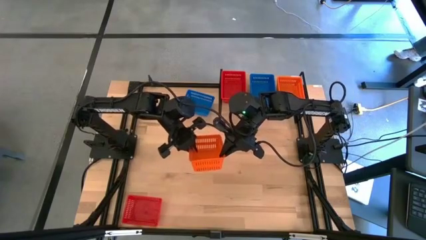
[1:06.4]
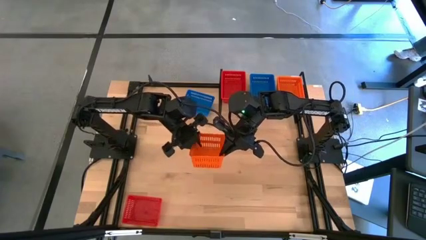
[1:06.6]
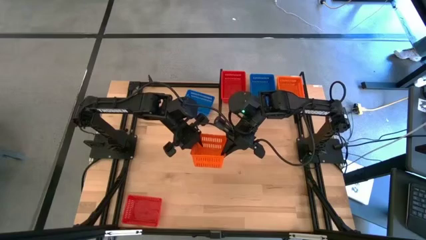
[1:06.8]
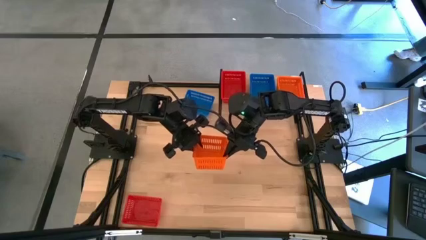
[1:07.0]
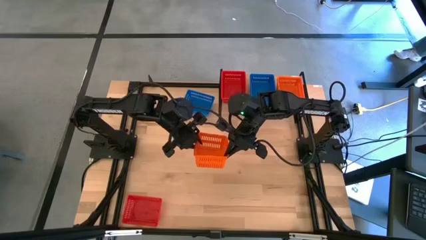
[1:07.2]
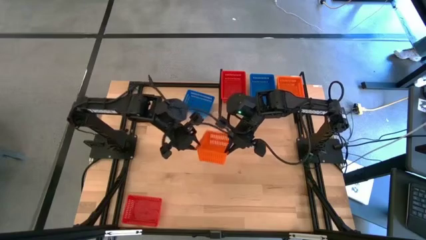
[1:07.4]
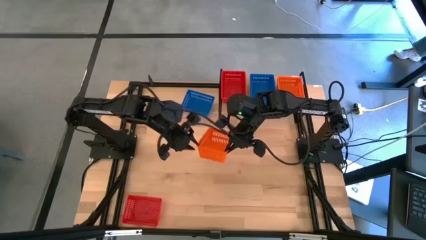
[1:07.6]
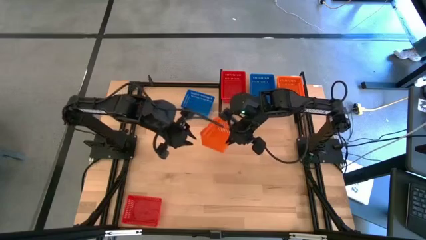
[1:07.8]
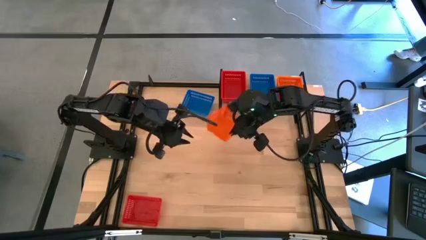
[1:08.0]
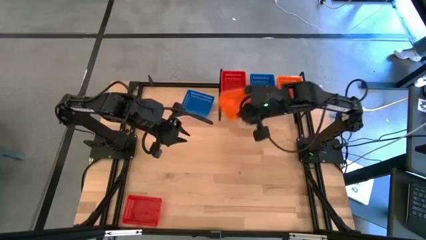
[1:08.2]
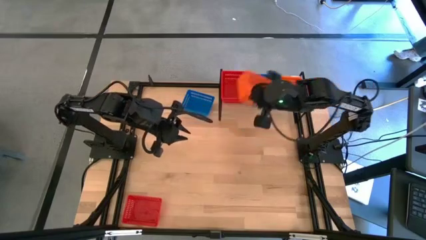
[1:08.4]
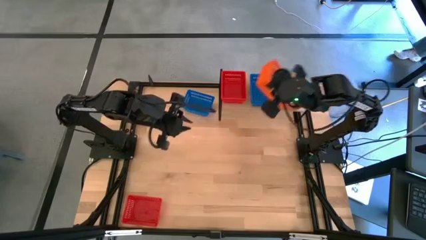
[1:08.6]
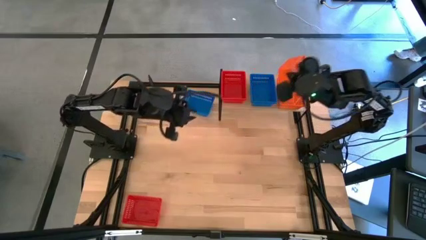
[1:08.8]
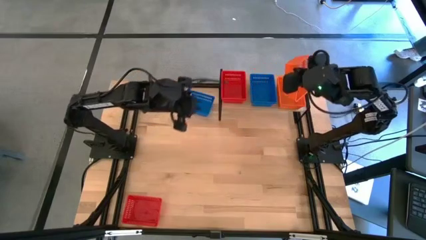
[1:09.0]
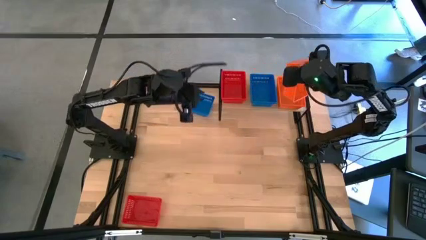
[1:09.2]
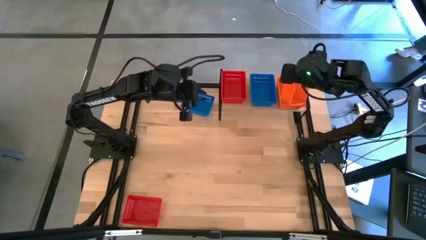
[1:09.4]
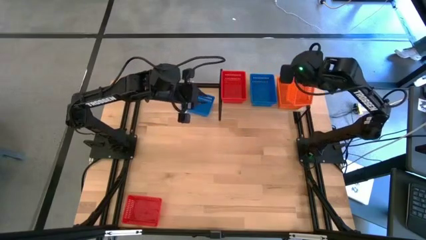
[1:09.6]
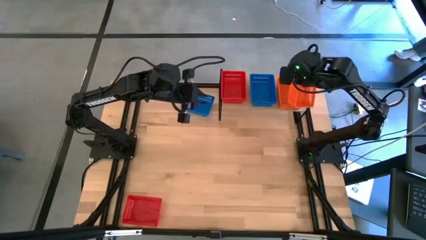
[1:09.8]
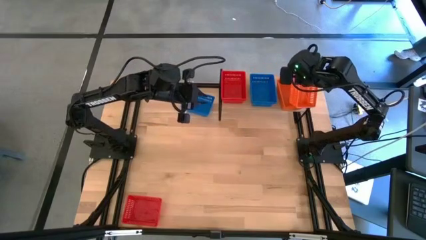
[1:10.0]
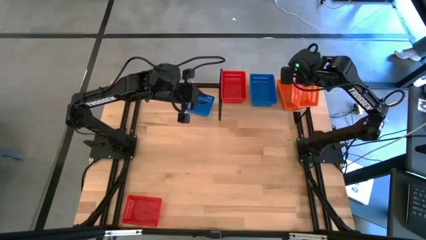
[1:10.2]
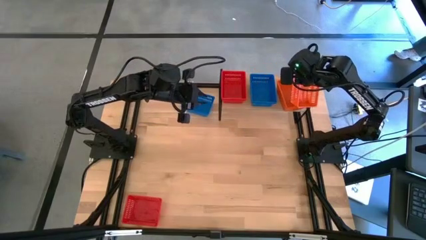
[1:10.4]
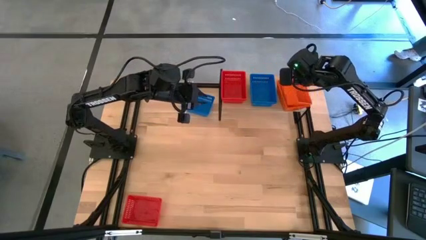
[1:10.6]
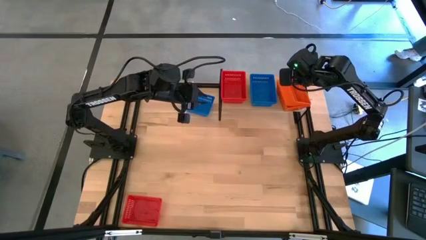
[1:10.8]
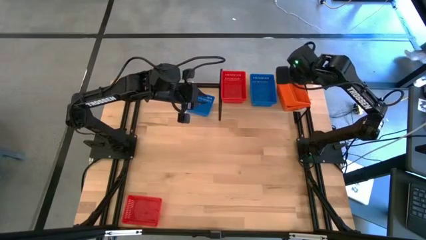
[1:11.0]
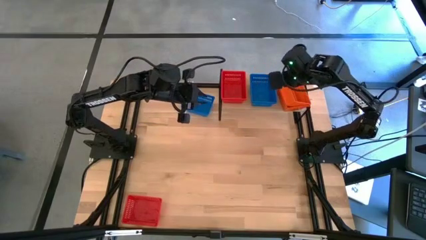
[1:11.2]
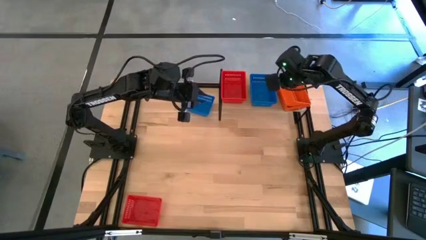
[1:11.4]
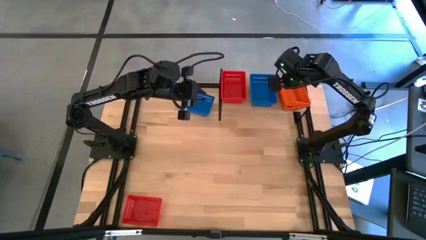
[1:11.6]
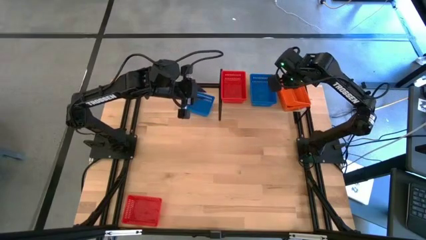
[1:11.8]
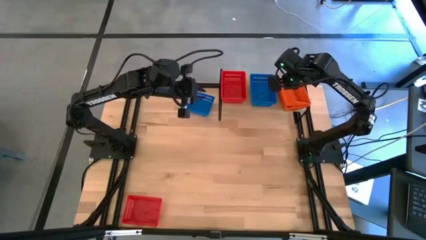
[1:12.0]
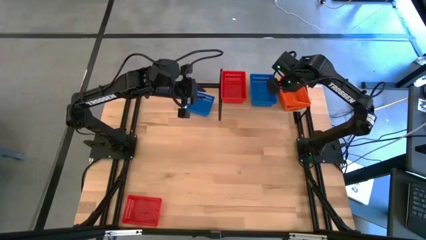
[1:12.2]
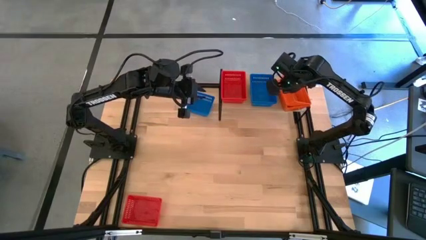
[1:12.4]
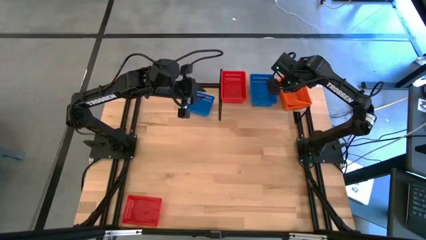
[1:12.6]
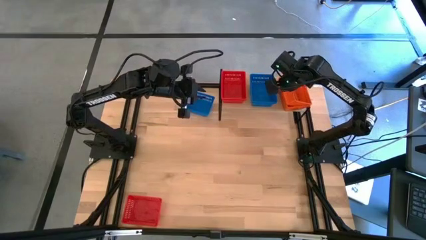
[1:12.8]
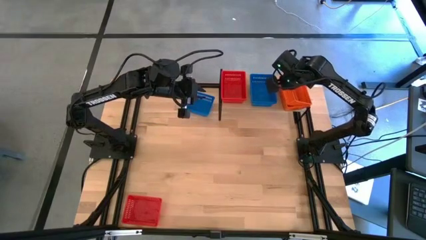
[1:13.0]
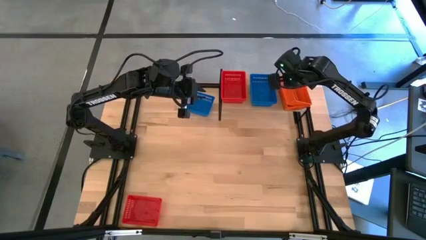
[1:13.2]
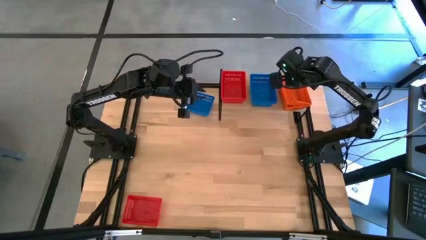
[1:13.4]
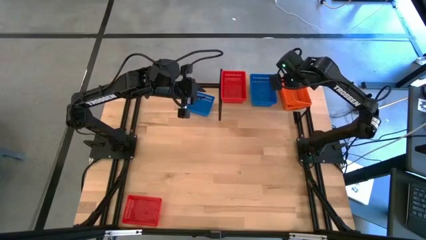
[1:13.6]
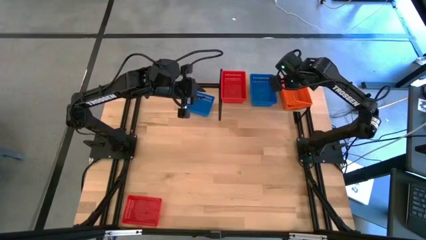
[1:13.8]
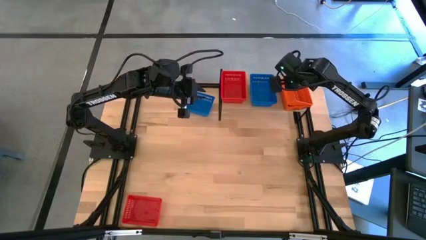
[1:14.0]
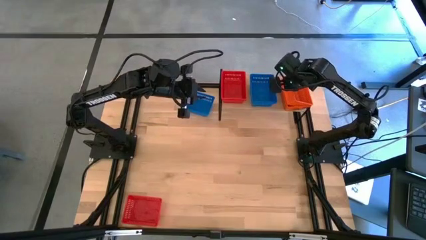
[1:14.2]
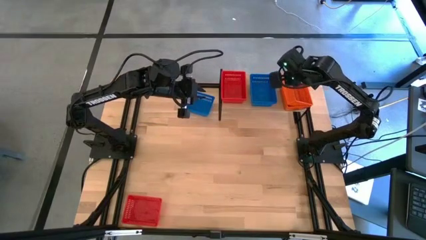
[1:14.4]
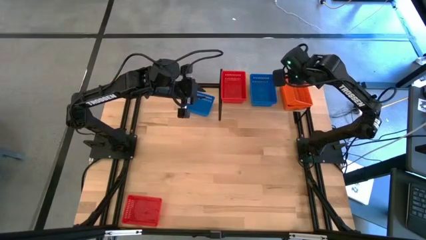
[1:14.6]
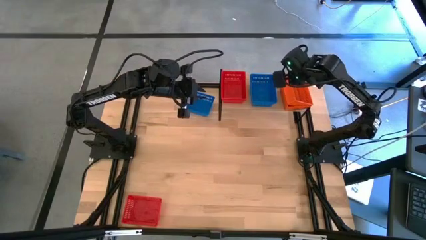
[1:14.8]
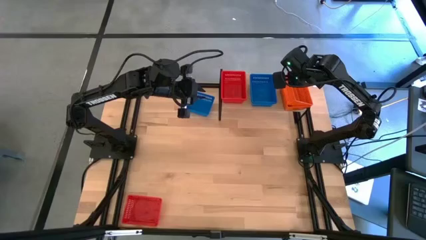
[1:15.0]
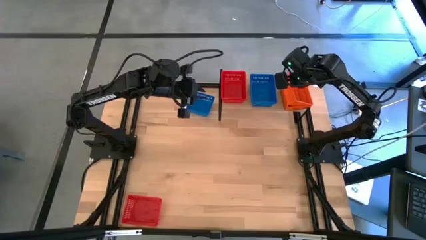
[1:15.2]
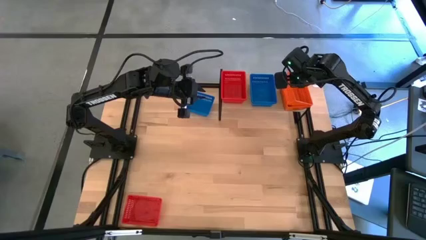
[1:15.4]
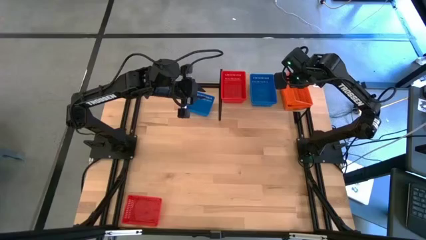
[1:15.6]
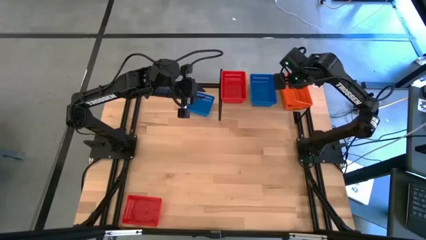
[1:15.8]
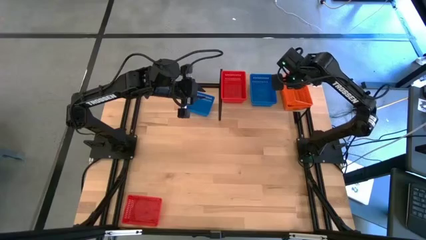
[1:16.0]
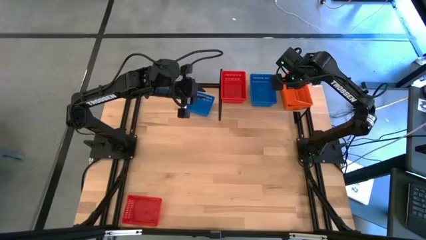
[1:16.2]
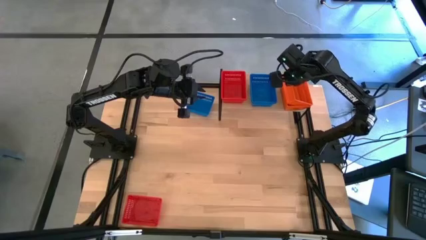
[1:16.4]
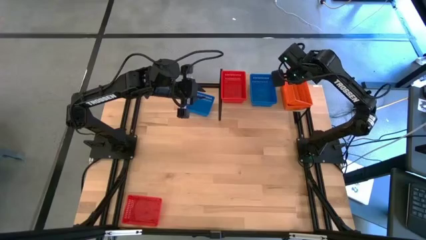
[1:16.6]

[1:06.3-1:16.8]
Task: Stack baskets on shelf by color
Stack the orange bin on top of the stacked orange bins on the shelf

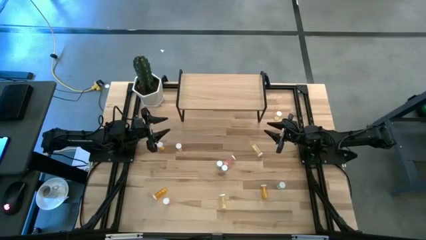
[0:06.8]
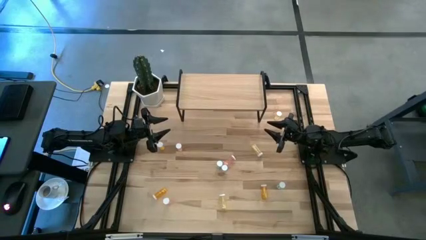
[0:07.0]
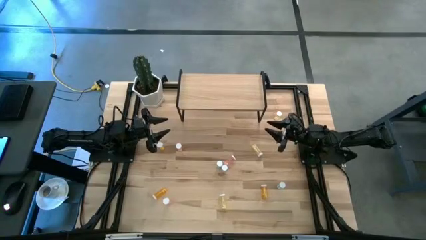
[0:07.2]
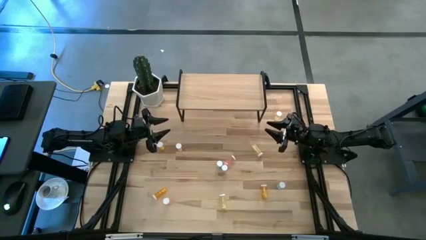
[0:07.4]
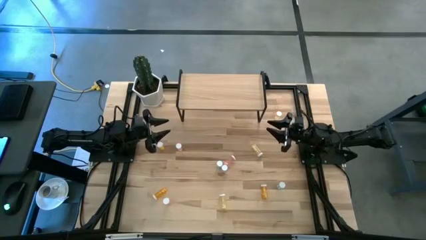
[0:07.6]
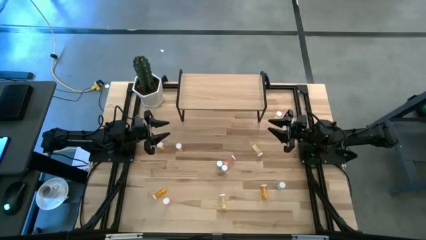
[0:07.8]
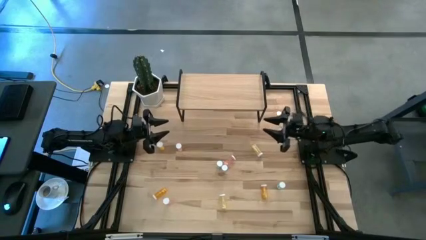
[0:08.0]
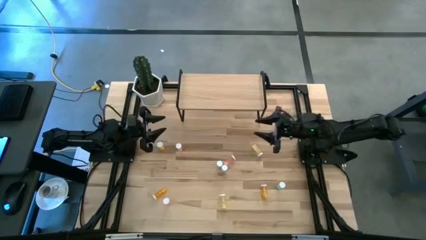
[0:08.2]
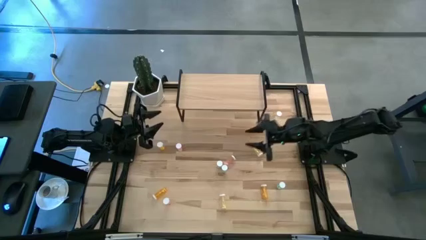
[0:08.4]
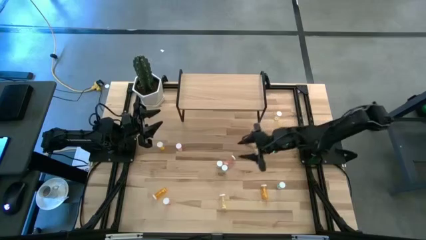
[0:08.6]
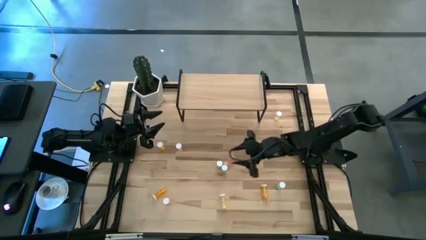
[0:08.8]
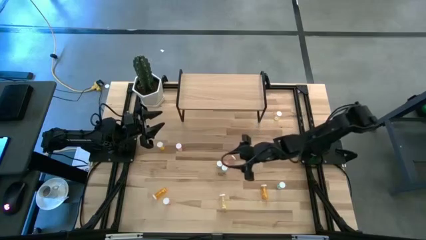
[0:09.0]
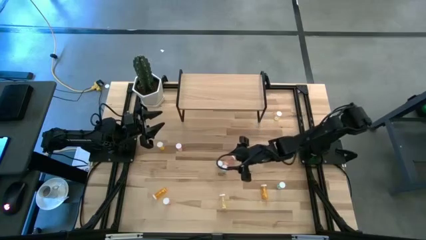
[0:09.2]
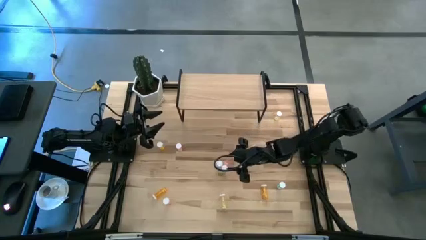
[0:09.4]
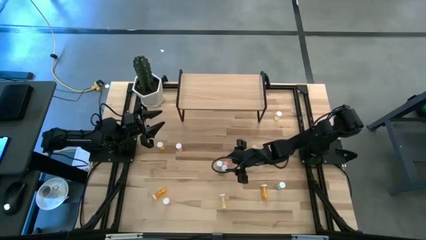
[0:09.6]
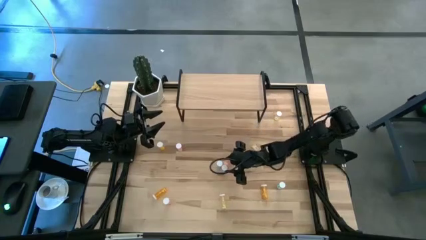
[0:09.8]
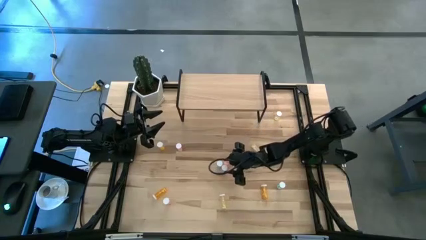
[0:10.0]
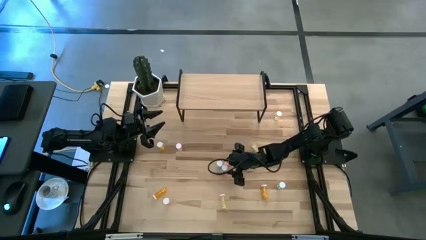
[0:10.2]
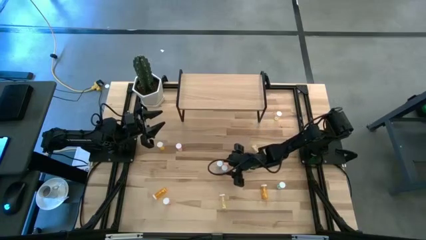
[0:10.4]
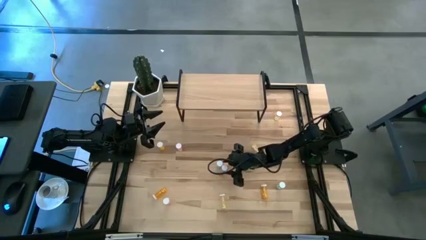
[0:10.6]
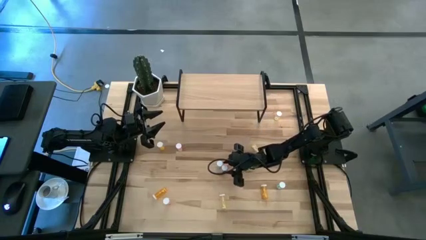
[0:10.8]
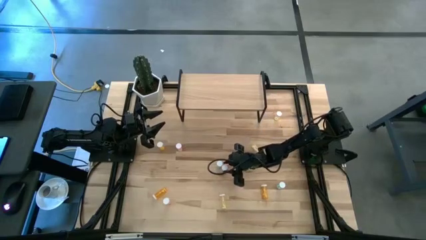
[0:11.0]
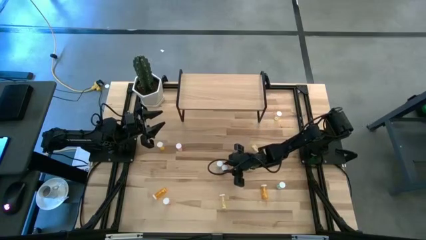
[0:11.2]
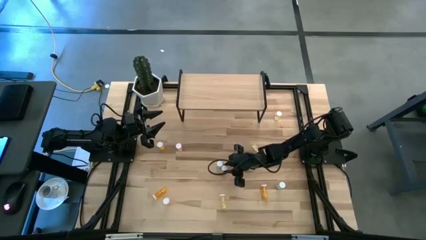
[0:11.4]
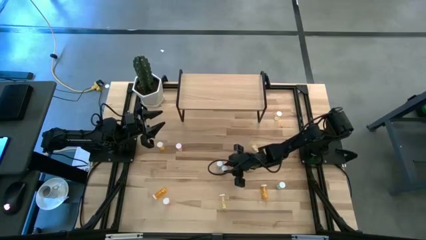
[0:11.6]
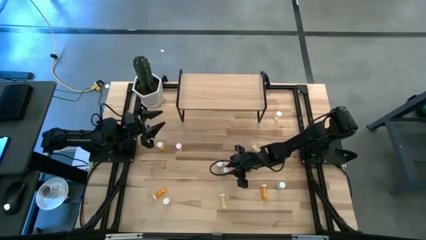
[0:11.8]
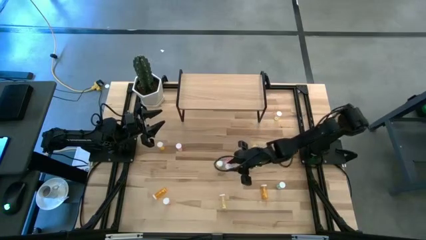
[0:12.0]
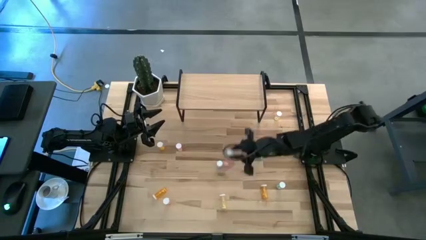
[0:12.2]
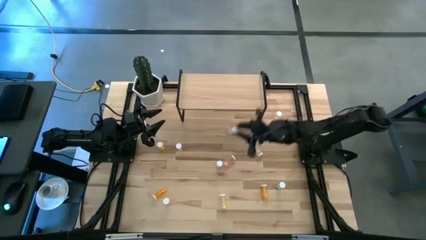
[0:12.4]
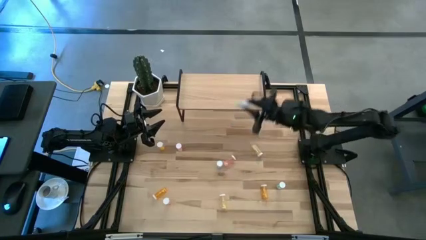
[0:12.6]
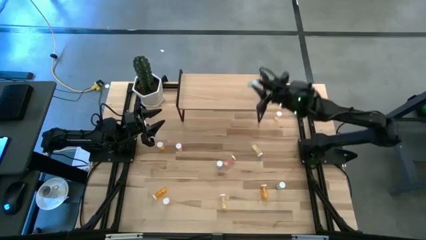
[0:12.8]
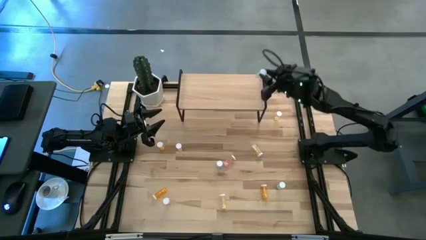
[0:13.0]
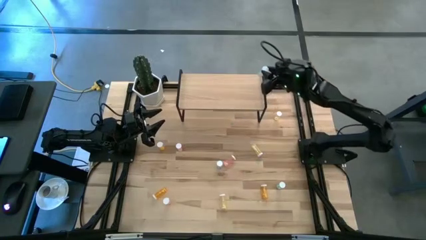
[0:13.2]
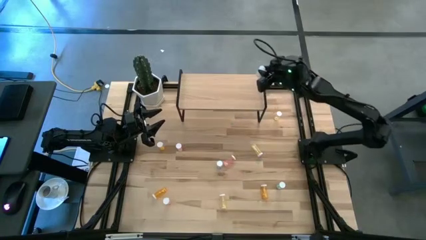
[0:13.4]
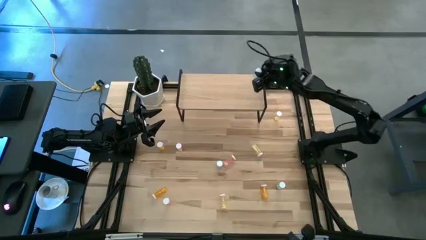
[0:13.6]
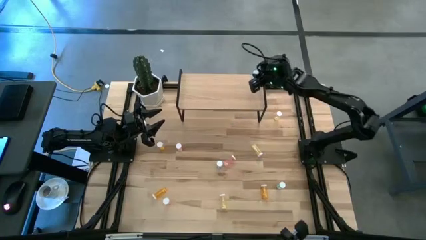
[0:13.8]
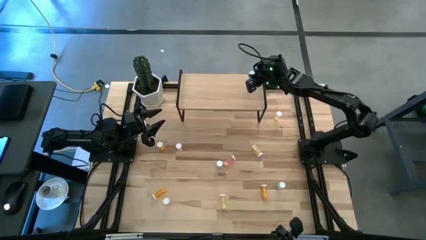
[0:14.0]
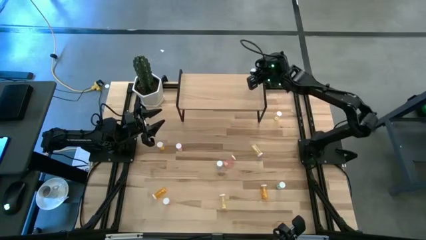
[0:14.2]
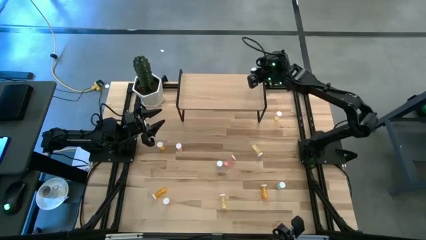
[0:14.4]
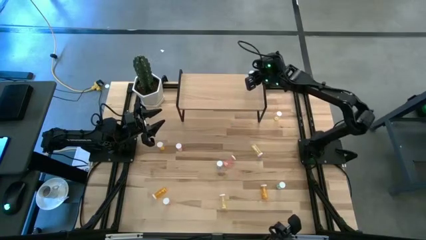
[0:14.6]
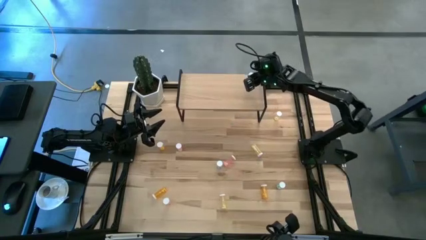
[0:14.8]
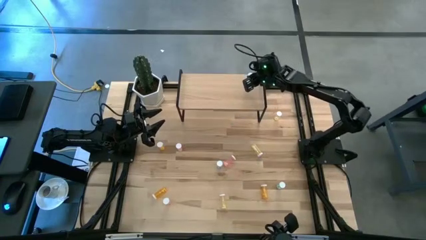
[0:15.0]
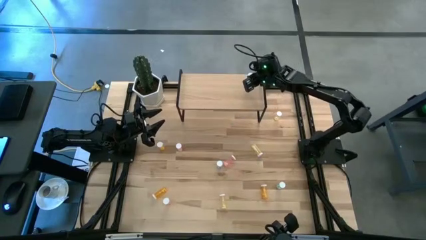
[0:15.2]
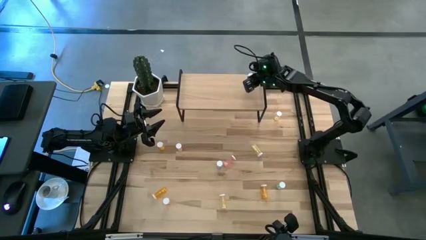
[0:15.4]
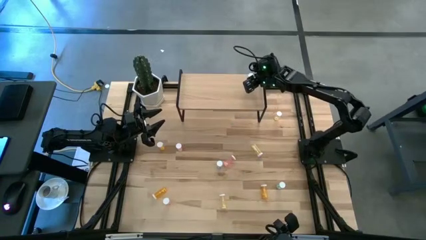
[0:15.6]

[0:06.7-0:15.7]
Task: Pick and place medicine bottles onto shelf by color
Put the middle blue pill bottle on the shelf
